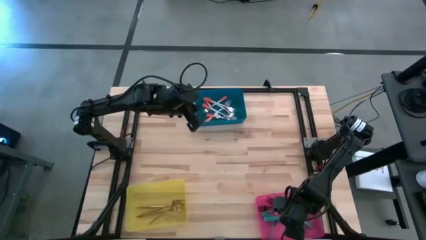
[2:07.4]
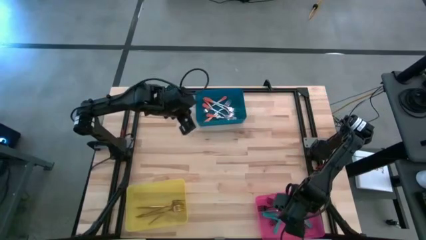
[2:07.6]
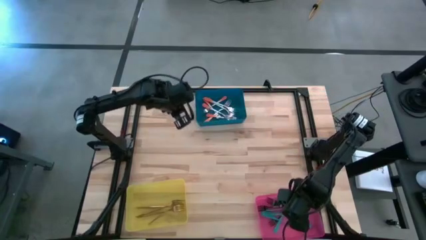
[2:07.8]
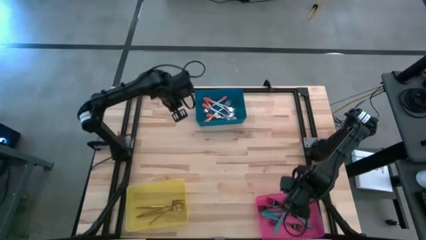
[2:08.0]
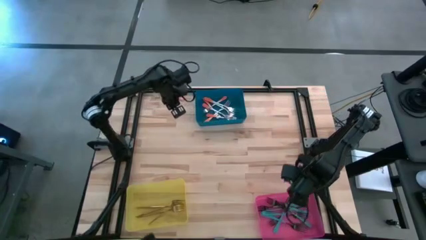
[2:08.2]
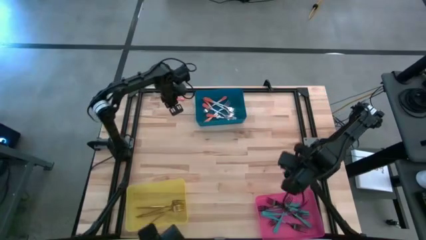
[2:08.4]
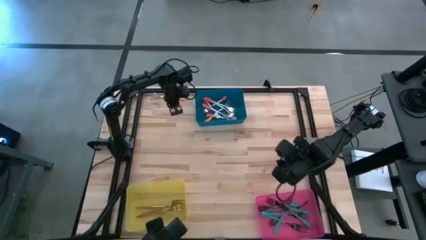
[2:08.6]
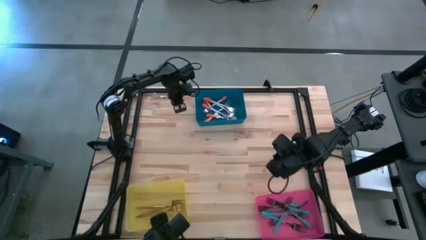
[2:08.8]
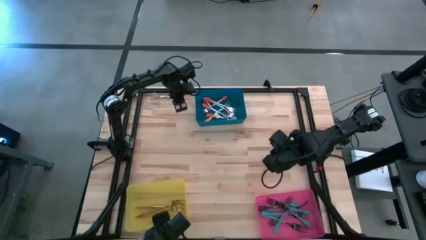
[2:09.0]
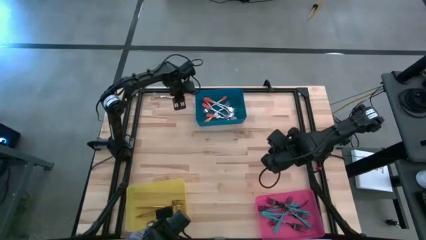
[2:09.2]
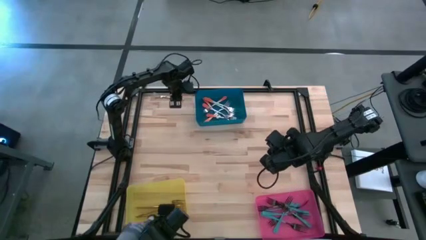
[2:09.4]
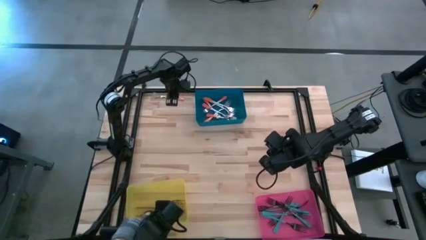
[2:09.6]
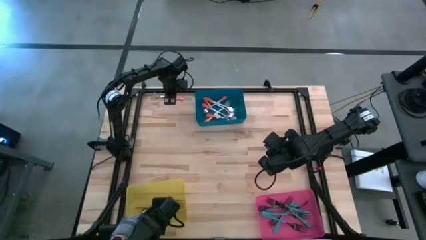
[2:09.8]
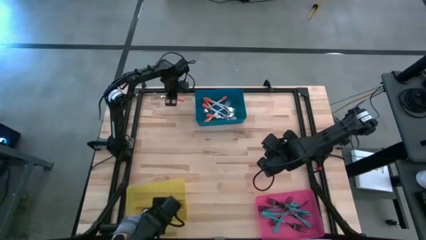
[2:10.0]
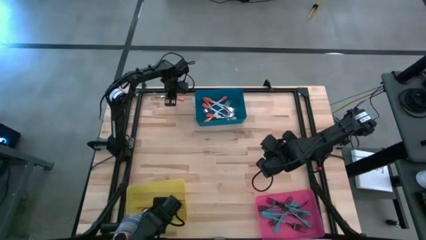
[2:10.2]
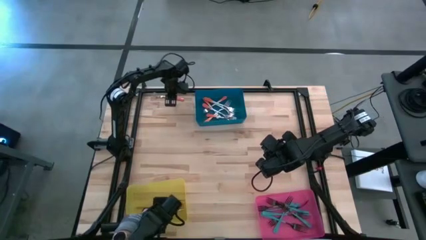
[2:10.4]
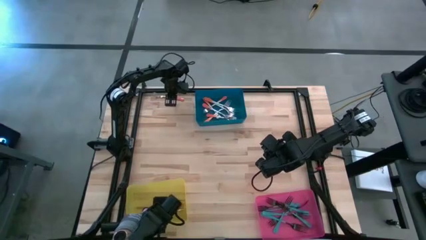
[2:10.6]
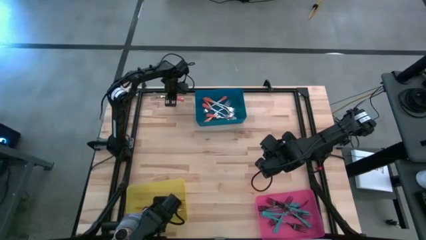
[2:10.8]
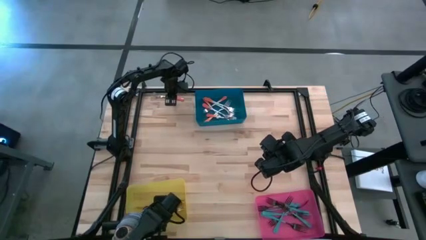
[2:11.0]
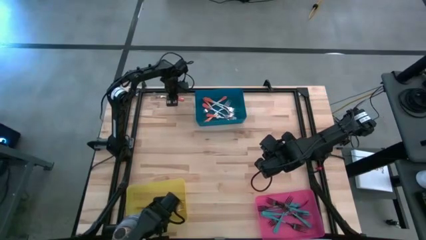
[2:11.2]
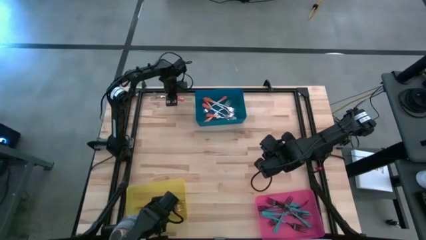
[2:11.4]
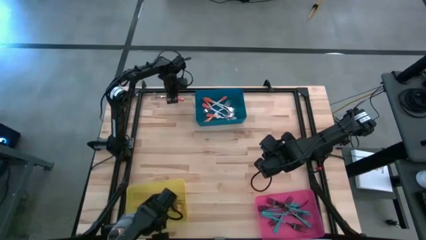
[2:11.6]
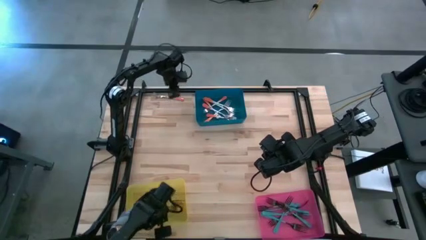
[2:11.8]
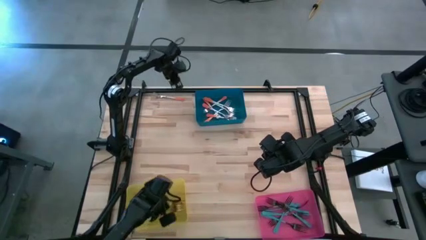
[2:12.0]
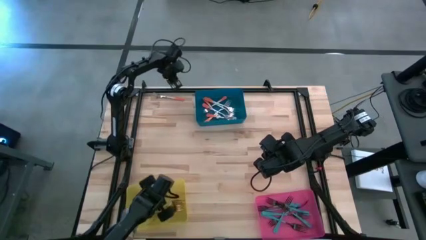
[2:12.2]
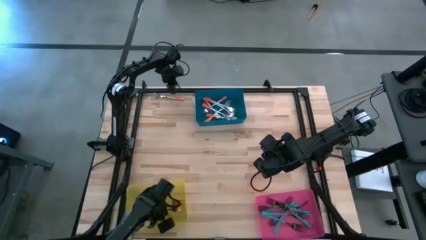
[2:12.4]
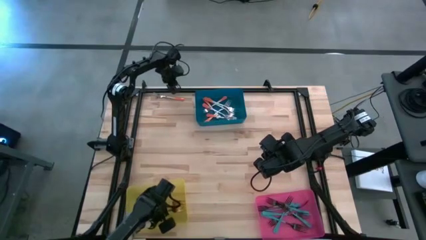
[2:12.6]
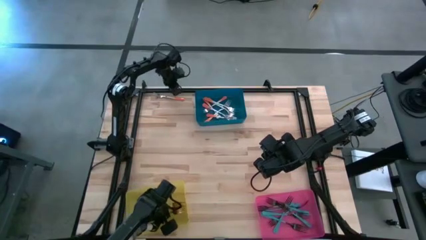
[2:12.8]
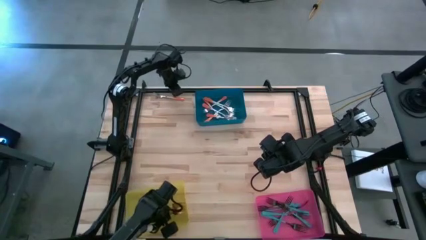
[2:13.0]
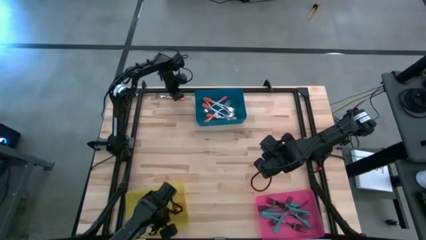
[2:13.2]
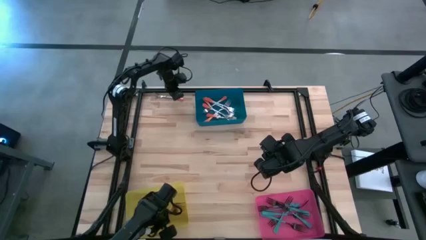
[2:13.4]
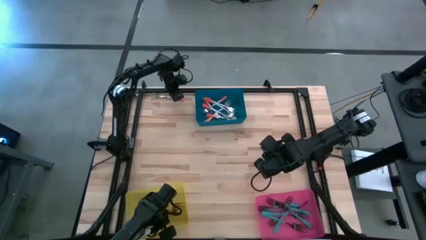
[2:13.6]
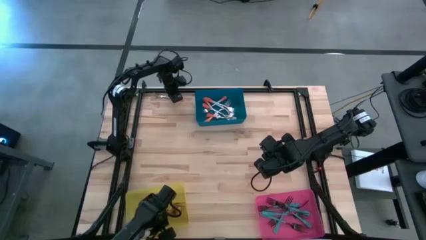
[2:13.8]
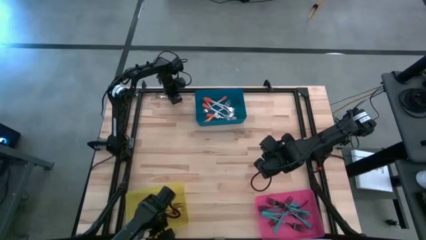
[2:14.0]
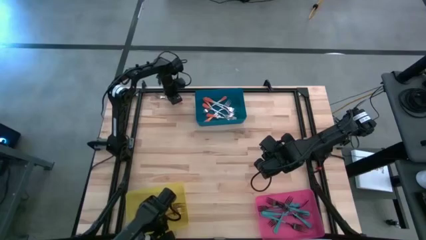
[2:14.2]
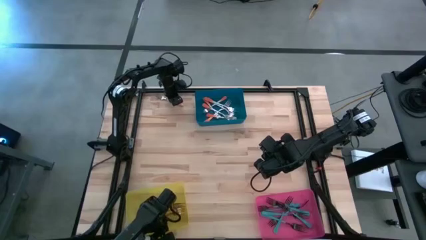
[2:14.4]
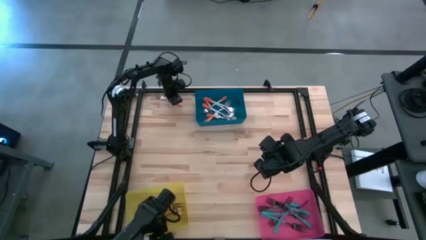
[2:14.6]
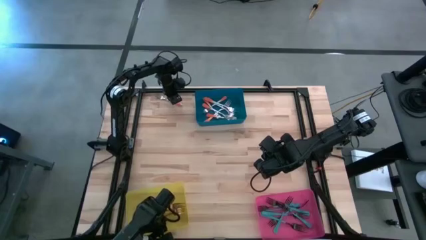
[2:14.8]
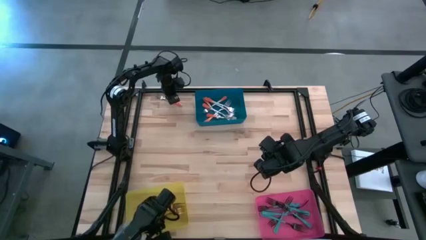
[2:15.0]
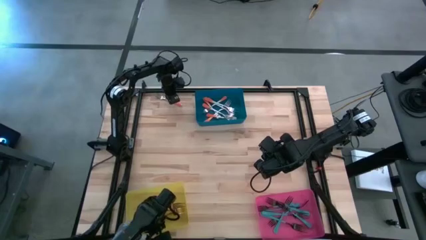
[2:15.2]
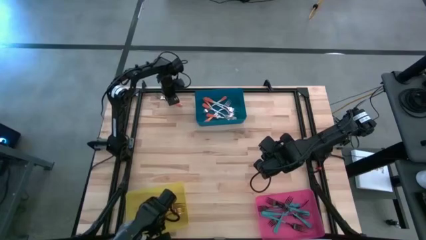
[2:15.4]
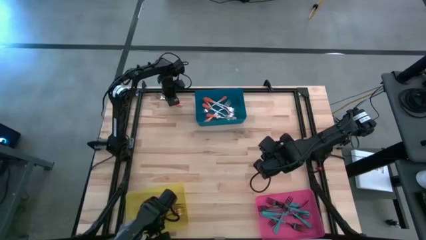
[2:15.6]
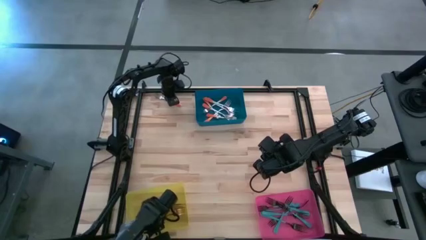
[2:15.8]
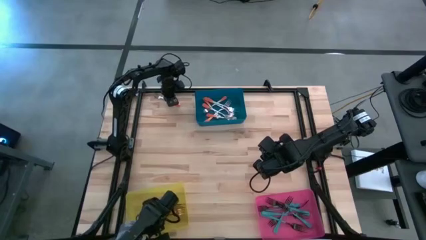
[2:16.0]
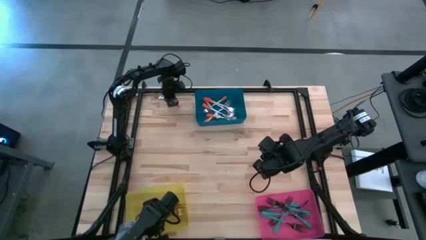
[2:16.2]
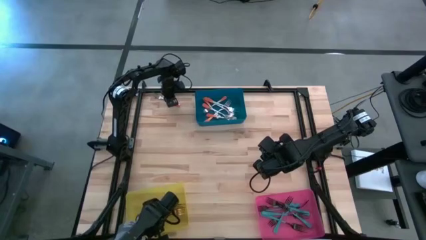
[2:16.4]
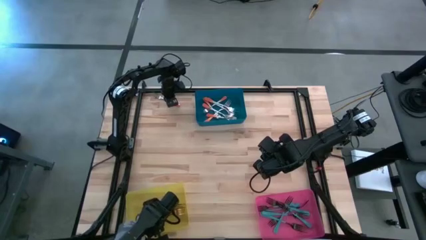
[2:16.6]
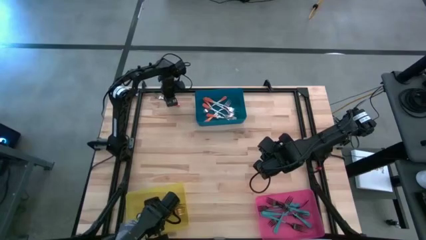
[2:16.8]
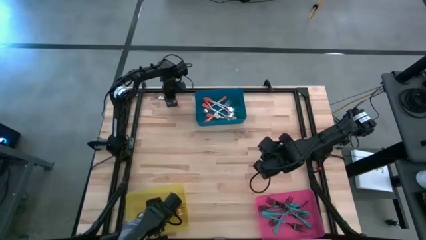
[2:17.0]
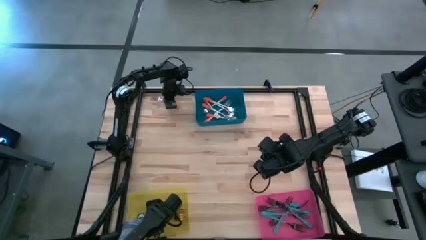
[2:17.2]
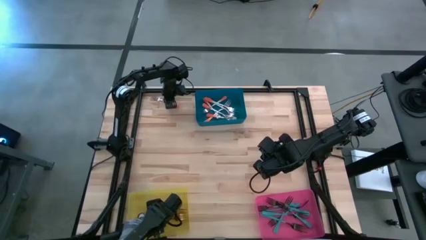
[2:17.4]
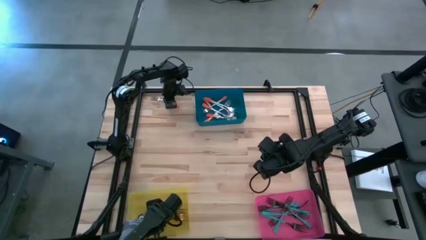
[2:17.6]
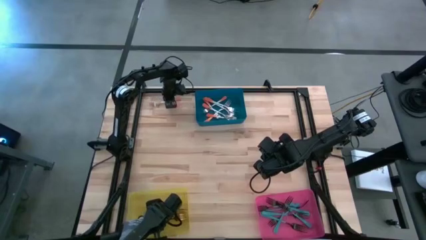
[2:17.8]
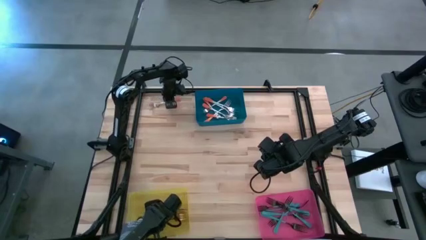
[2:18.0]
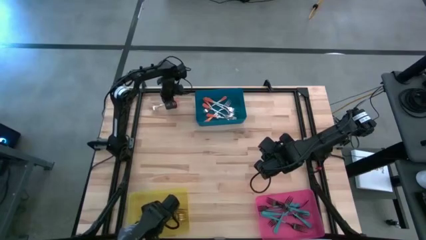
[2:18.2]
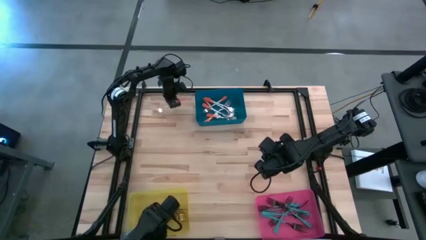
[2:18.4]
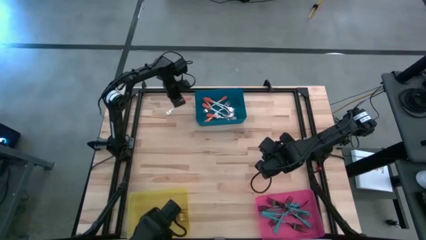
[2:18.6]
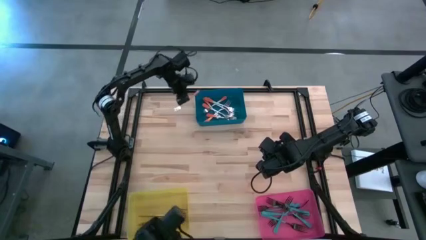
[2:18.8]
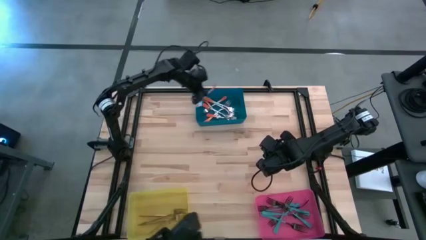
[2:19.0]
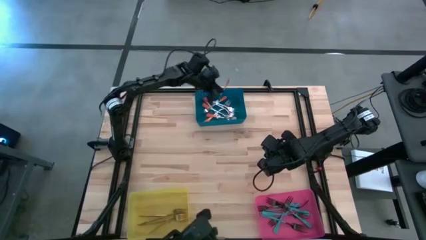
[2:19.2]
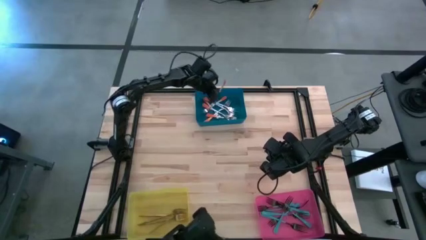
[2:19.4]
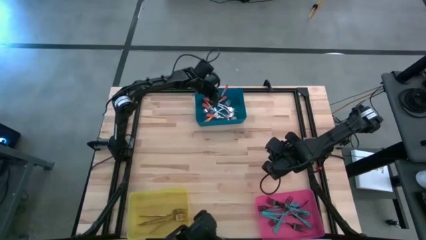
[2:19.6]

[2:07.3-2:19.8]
Task: Sort silverware by color (type)
Put the orange fork into the blue bin

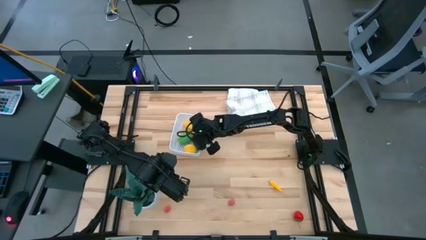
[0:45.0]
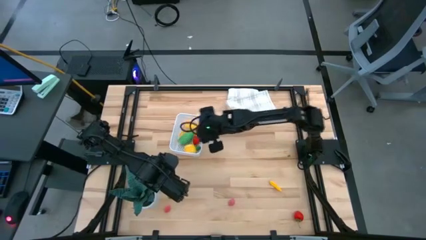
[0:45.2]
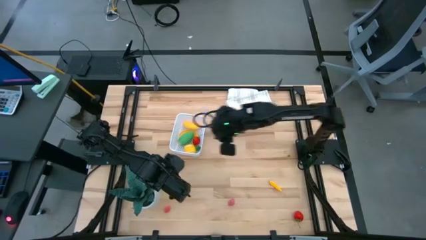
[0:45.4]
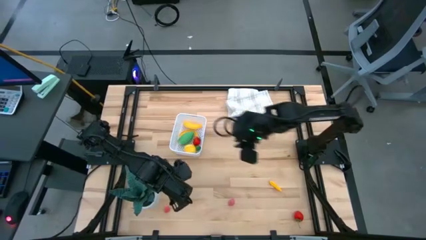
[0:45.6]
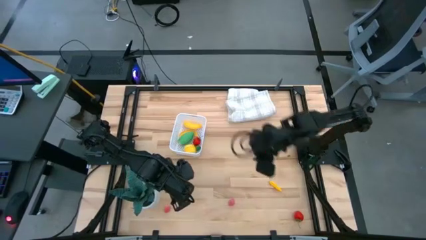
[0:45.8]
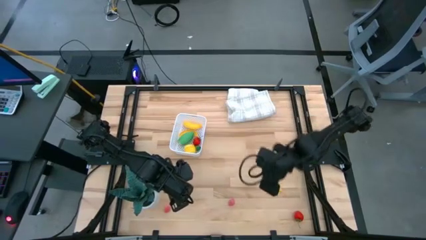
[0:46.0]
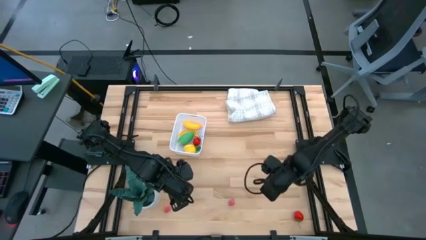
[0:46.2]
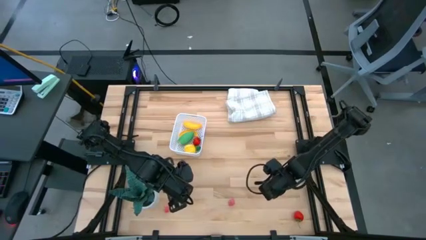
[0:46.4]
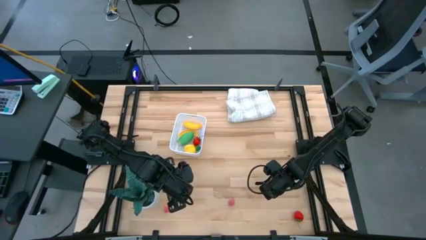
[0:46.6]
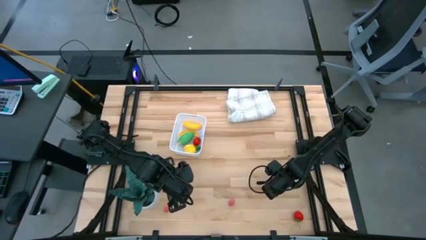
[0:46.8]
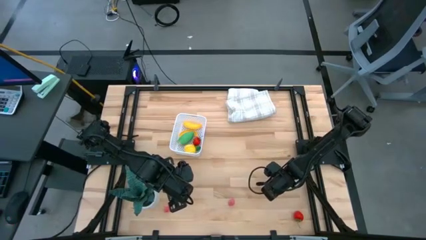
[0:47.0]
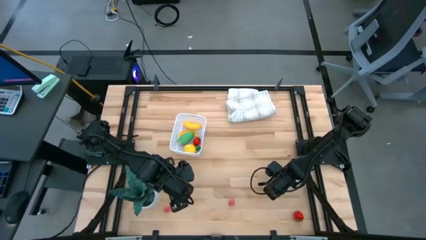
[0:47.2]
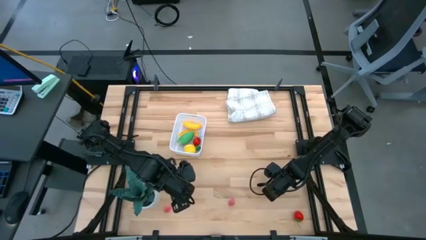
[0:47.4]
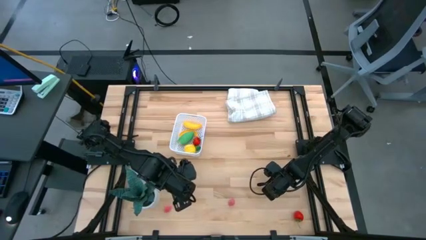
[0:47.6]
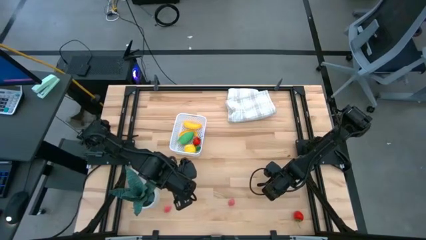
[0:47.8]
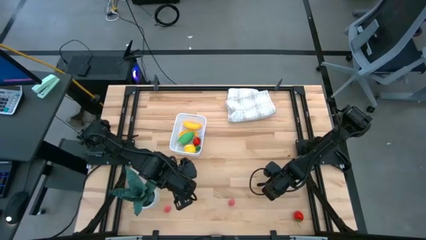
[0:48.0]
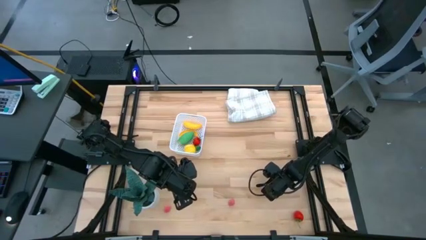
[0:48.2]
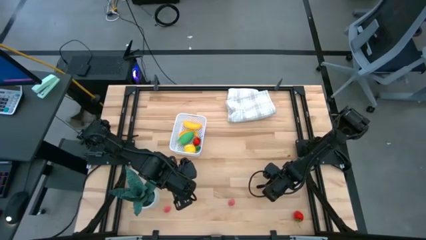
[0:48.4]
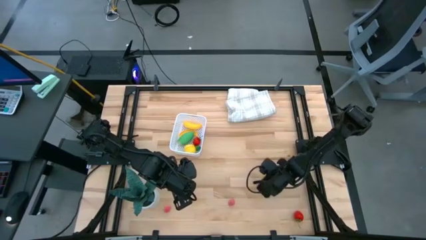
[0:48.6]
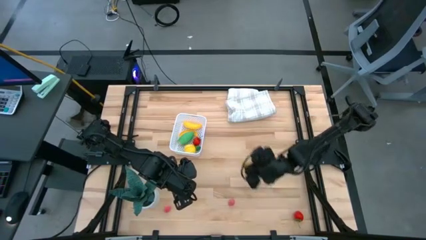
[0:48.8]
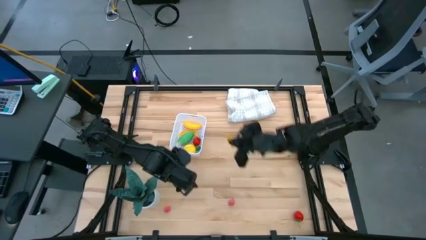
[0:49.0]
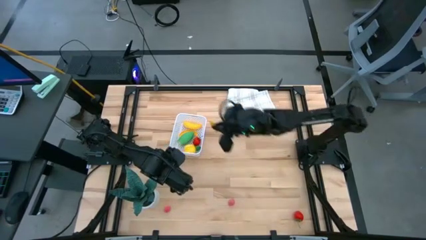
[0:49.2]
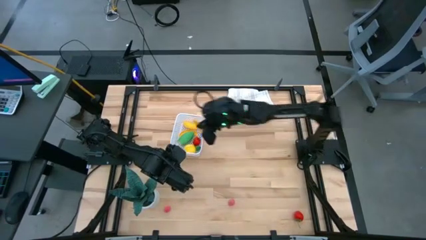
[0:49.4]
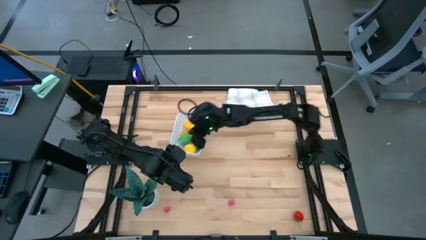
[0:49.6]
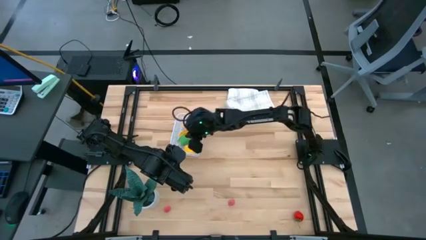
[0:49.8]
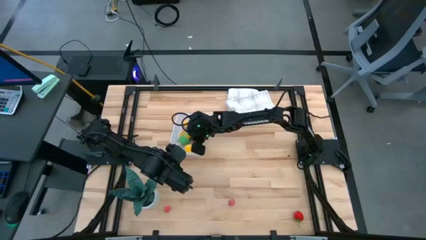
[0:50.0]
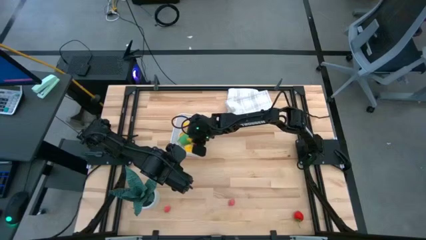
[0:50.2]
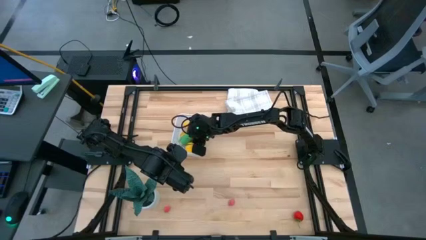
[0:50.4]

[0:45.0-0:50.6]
Task: Pick and placing Produce into tupperware
Put the corn into the white basket
